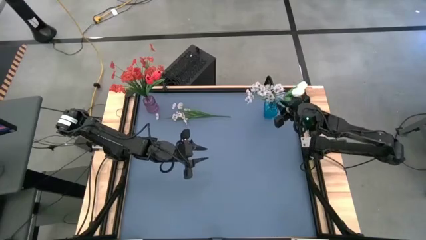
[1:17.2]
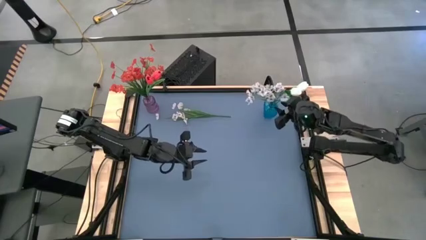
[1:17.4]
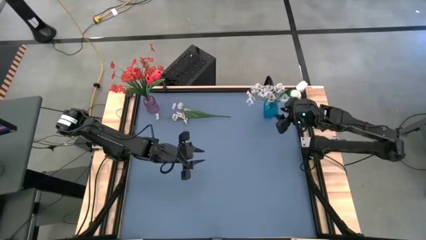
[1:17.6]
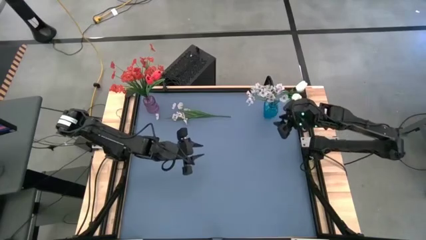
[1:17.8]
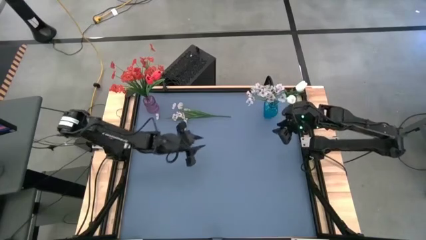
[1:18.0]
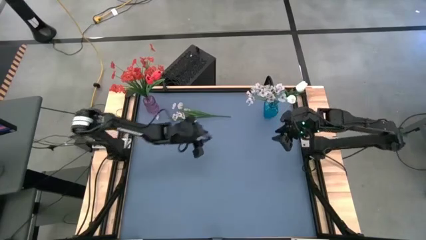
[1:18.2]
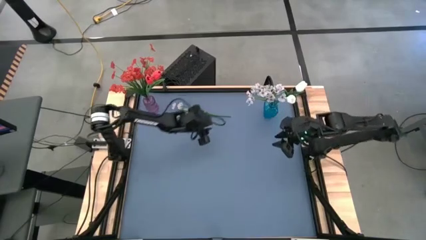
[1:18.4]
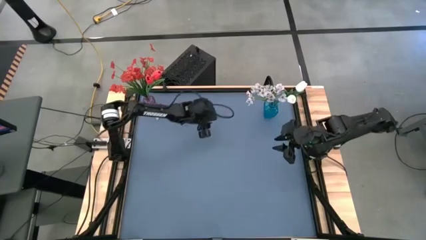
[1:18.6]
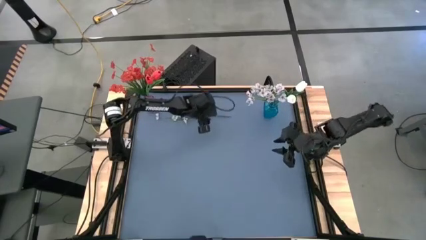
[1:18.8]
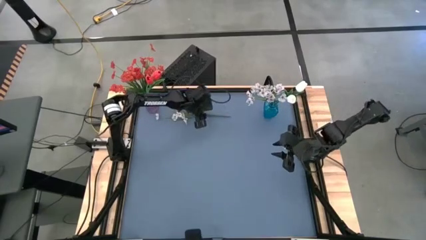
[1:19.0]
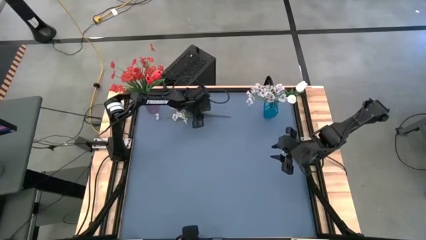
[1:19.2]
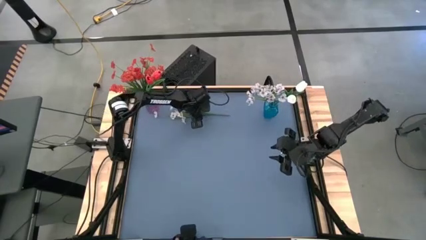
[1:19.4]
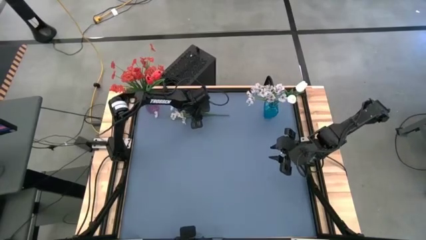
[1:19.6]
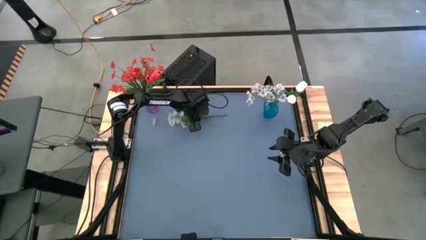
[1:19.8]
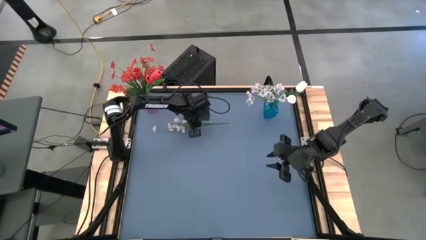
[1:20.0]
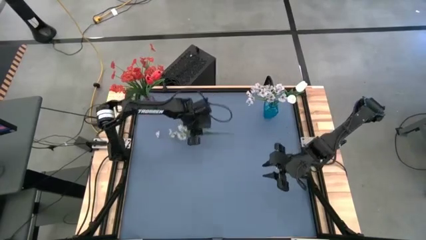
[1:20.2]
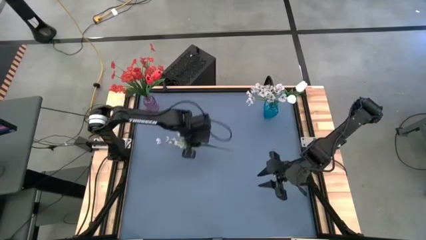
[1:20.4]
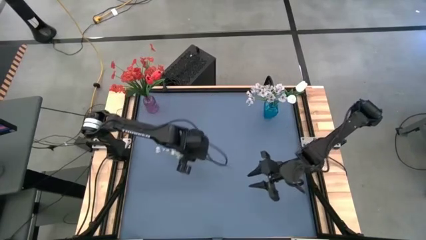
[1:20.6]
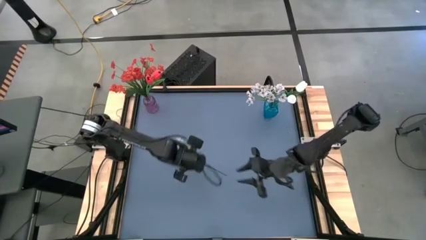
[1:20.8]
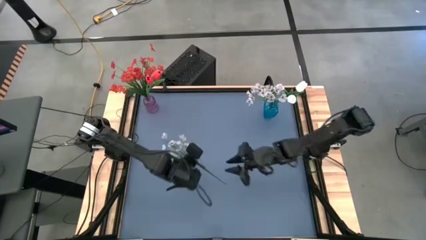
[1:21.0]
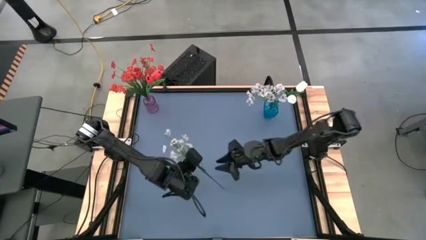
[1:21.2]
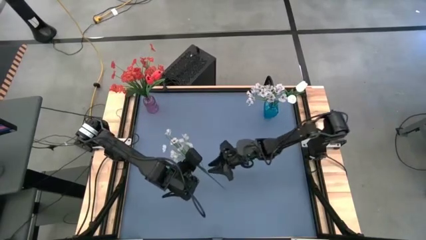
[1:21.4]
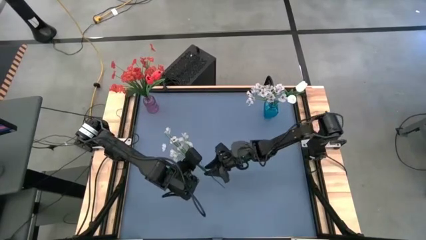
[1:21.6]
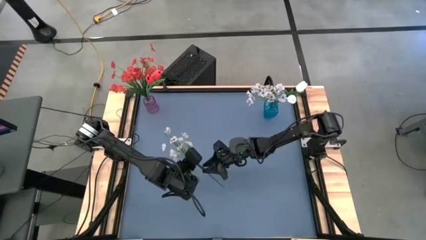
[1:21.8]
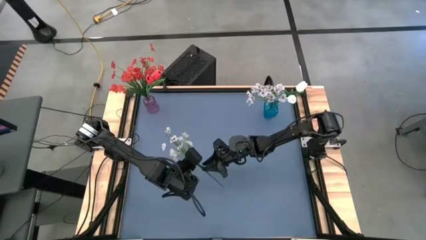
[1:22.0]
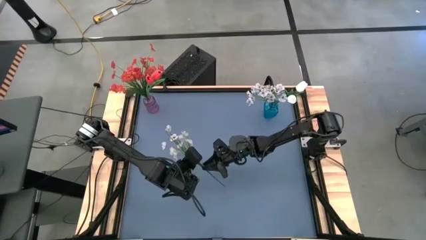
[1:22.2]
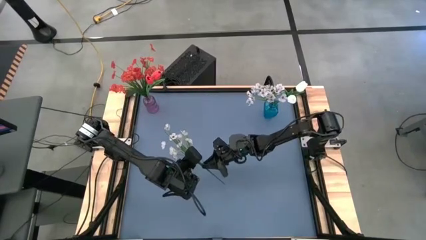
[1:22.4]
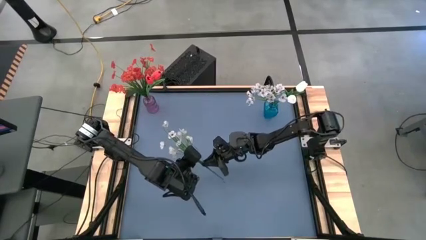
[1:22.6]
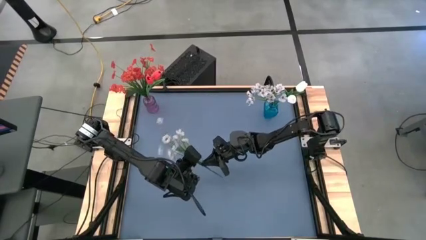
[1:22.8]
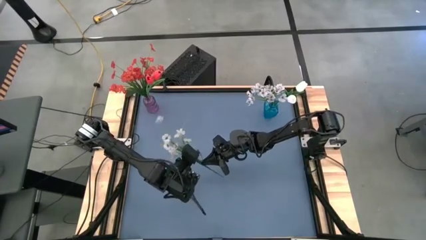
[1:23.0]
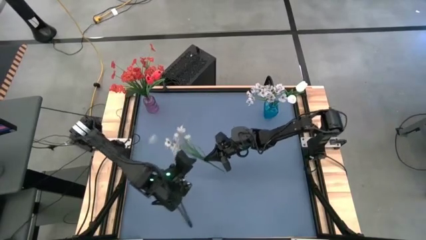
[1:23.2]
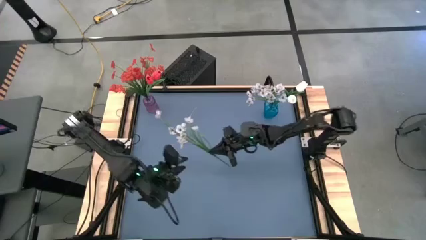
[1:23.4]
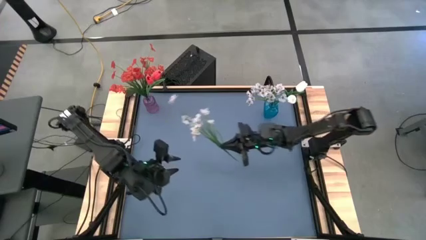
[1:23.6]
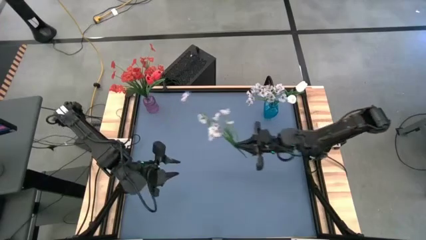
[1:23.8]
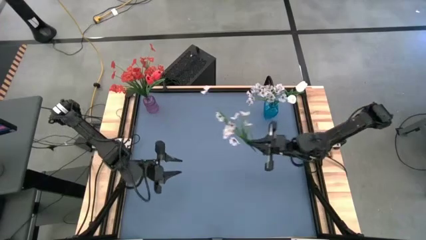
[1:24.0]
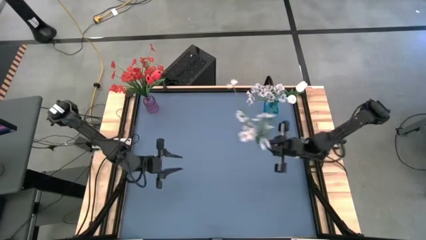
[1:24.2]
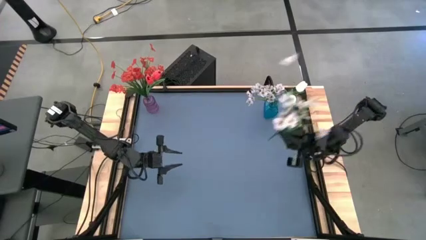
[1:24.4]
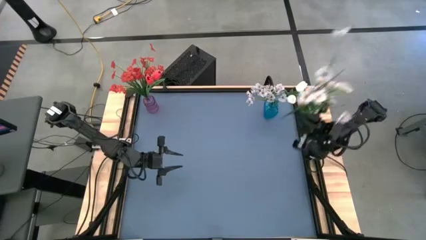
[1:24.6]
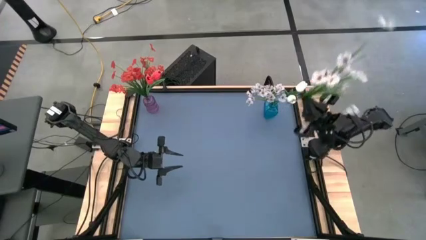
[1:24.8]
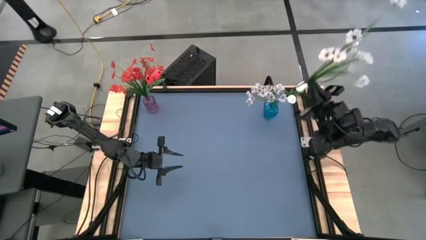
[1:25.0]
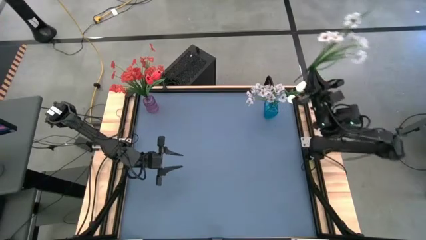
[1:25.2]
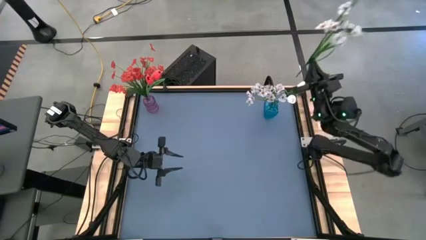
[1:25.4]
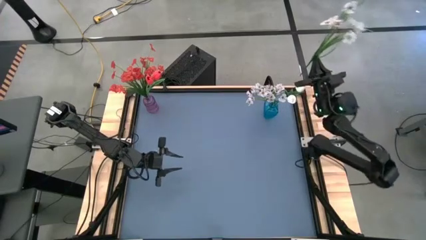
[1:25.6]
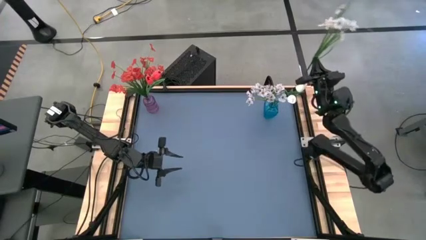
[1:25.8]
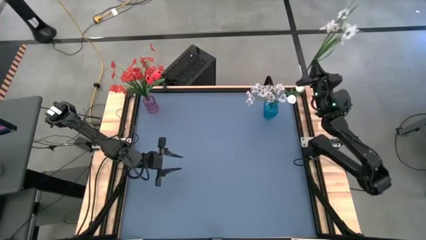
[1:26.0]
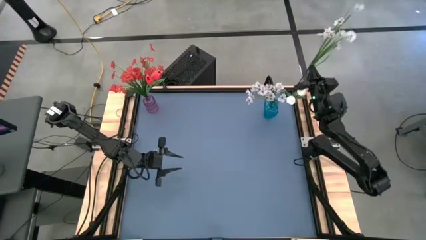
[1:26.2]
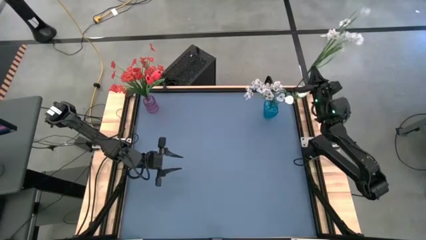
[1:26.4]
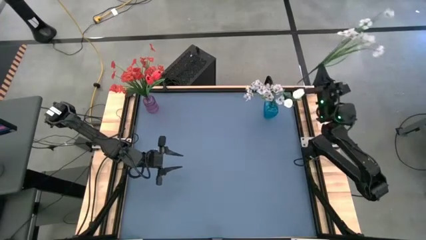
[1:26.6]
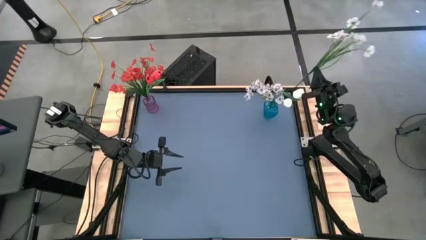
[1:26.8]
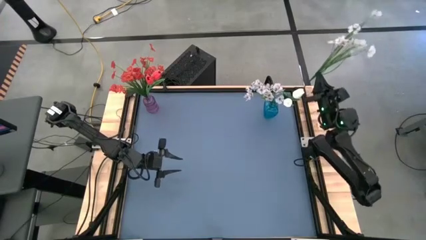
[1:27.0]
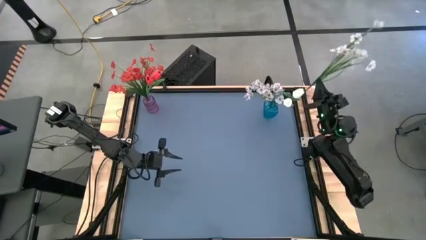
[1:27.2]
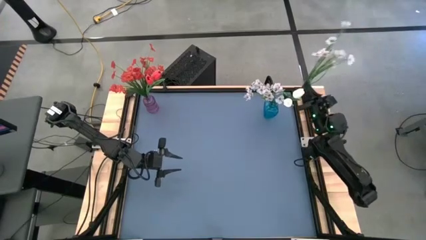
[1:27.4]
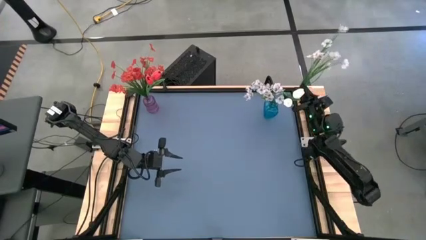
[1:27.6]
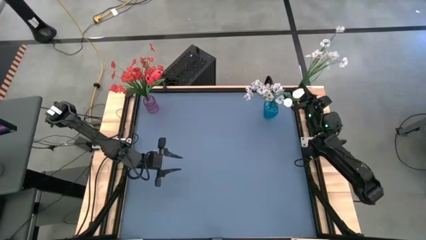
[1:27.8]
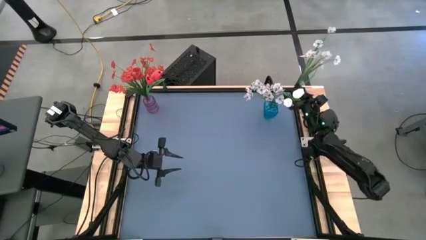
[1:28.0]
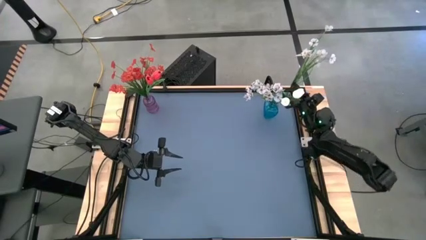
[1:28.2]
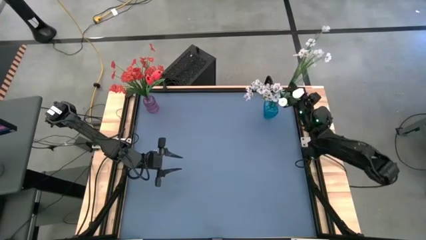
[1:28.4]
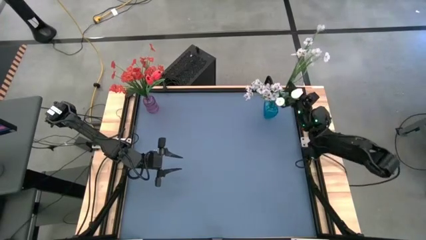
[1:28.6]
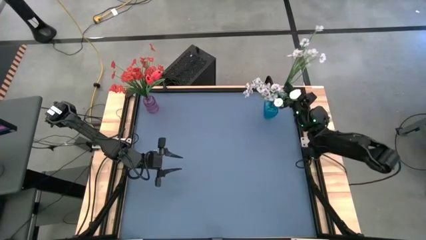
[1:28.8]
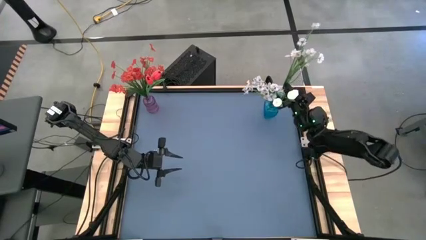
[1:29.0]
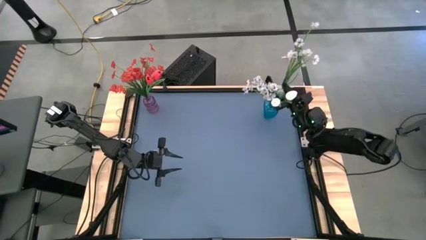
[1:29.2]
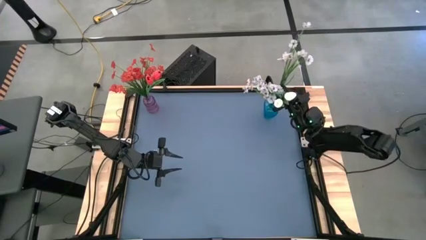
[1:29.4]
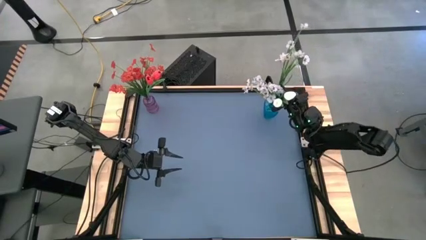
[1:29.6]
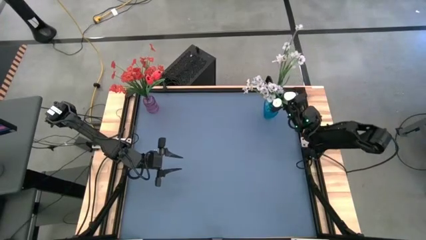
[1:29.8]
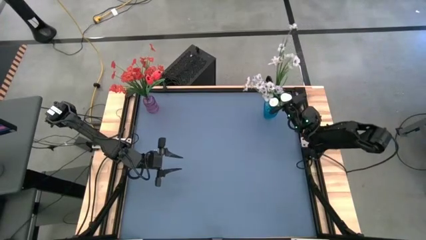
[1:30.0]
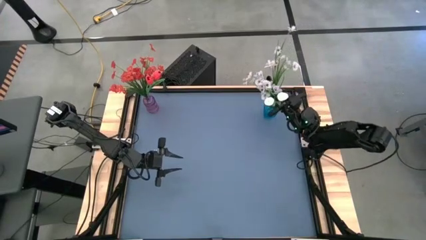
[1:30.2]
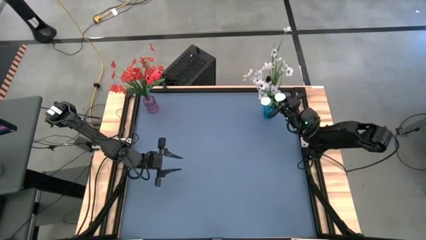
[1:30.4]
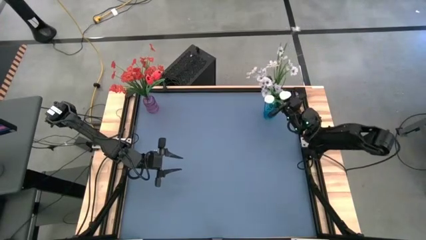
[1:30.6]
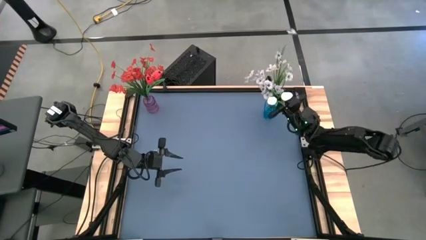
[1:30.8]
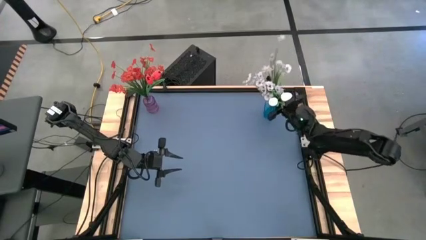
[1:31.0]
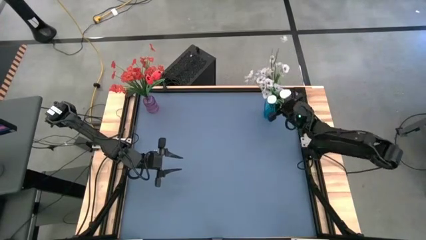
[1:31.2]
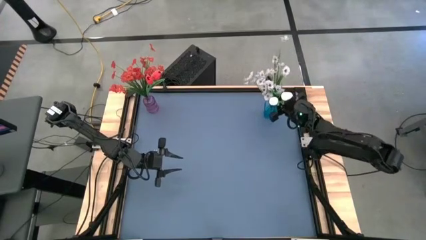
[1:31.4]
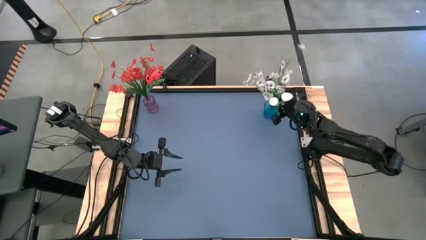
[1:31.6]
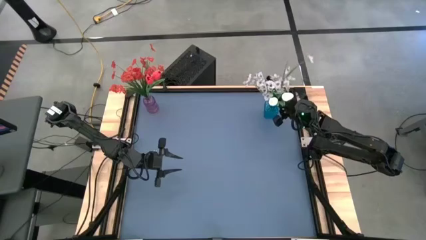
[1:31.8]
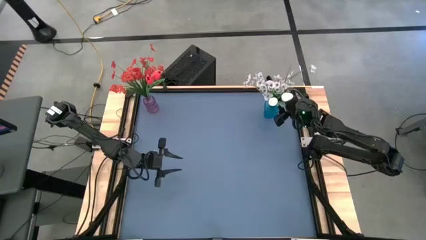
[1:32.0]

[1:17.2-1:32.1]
Task: Sort flowers into vase by color
Put the white flowers into the blue vase
